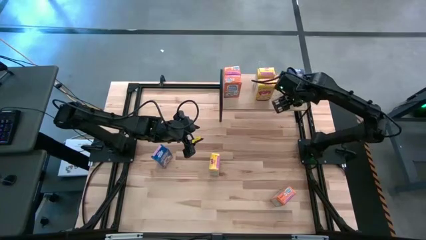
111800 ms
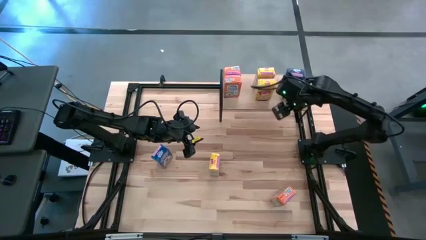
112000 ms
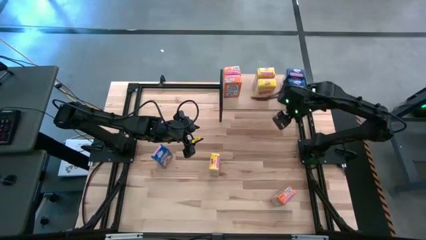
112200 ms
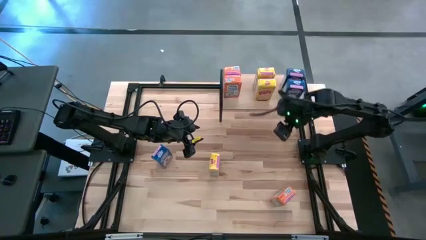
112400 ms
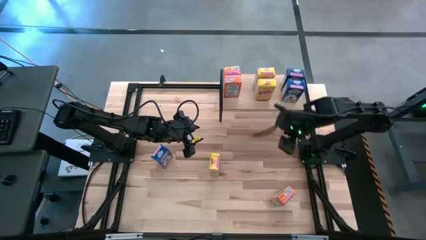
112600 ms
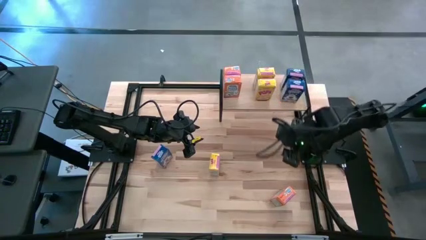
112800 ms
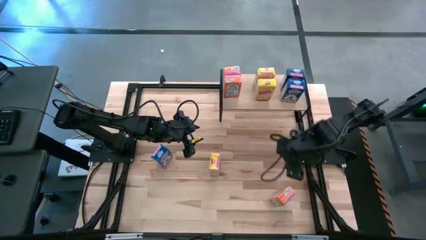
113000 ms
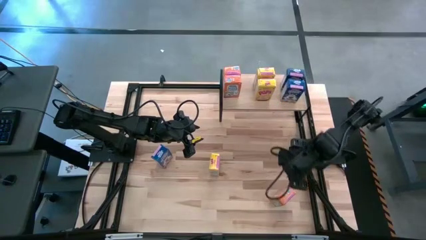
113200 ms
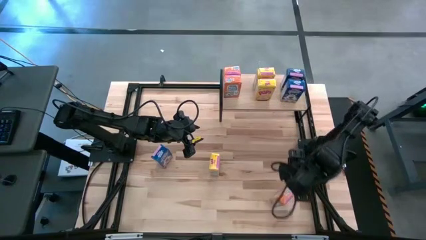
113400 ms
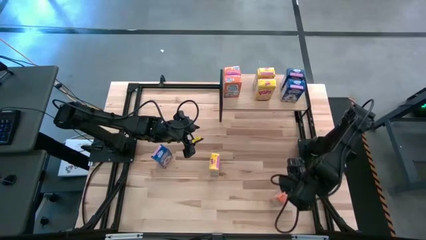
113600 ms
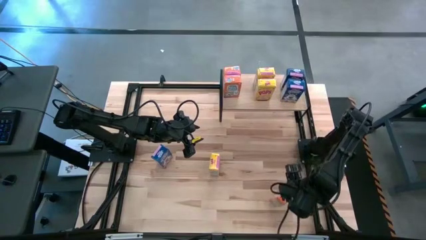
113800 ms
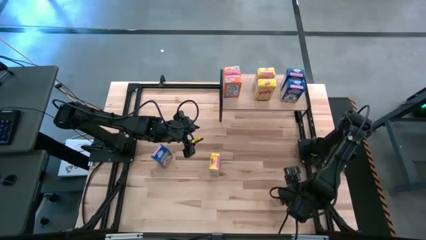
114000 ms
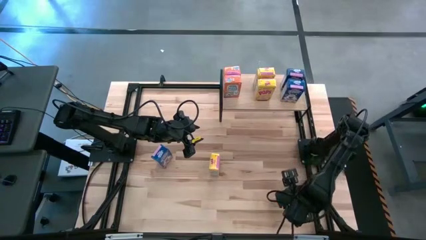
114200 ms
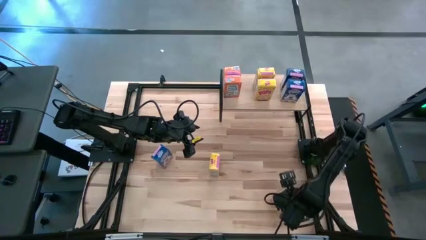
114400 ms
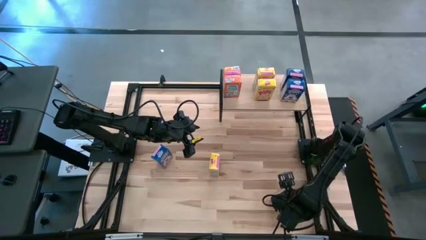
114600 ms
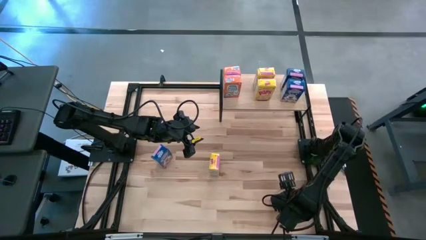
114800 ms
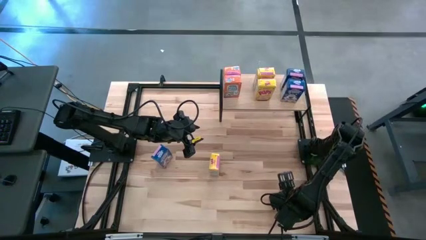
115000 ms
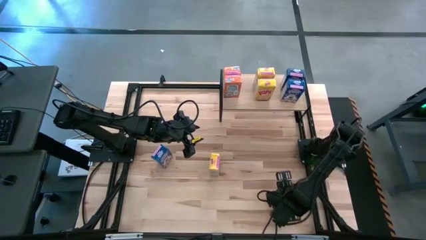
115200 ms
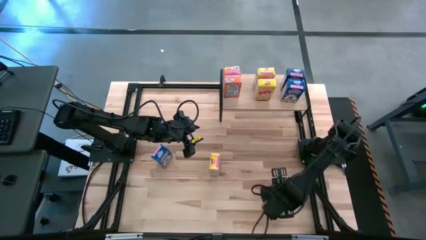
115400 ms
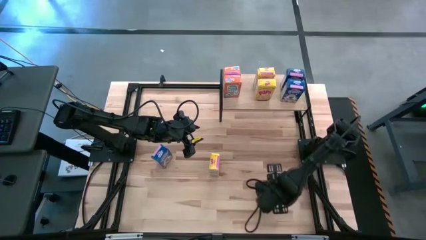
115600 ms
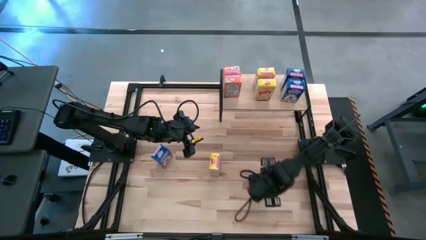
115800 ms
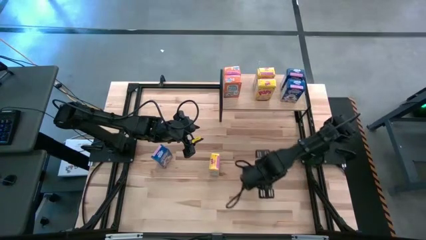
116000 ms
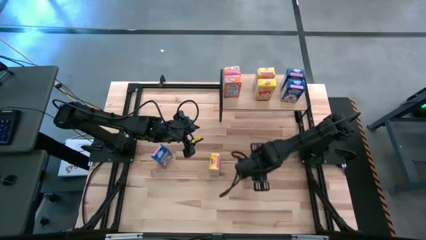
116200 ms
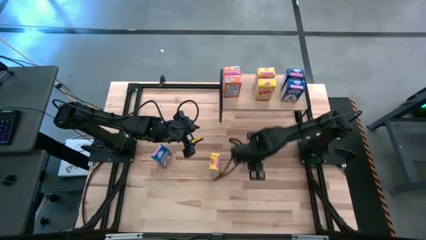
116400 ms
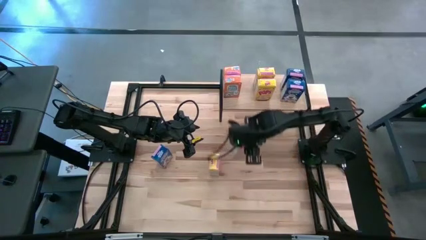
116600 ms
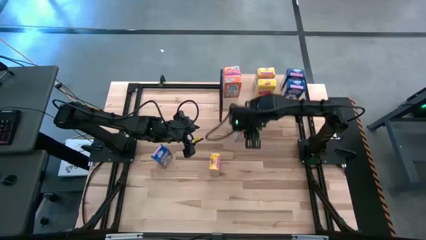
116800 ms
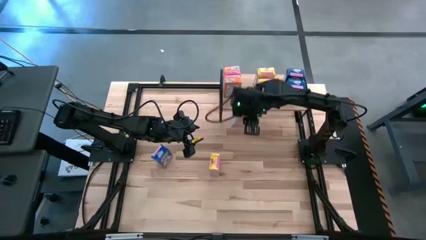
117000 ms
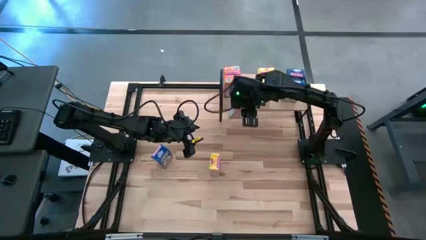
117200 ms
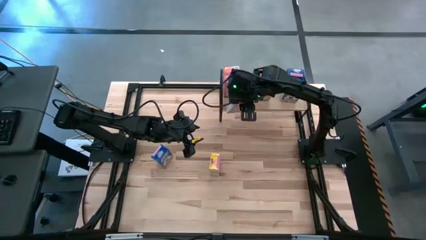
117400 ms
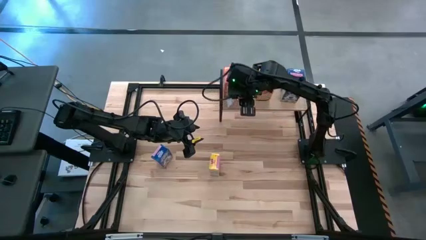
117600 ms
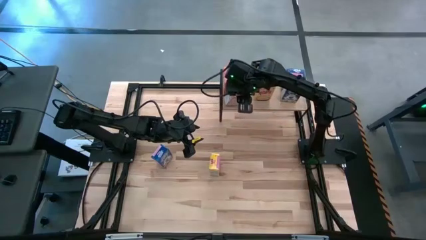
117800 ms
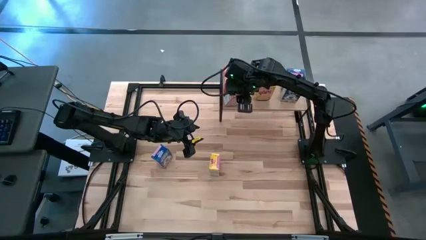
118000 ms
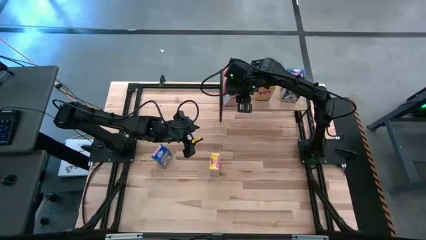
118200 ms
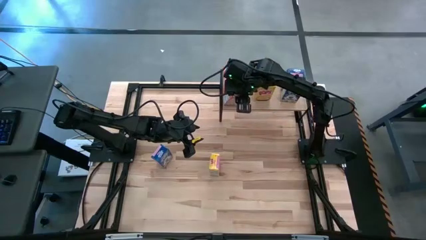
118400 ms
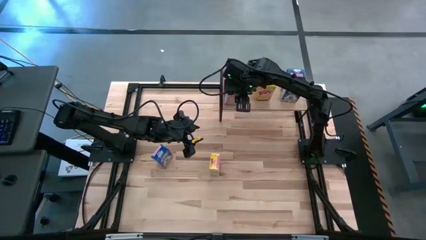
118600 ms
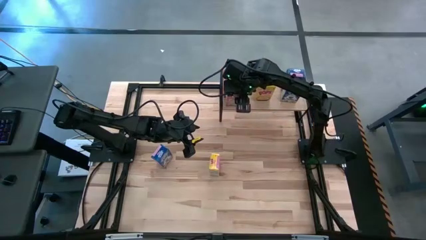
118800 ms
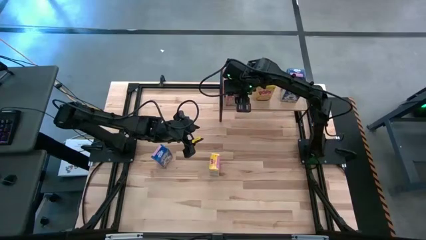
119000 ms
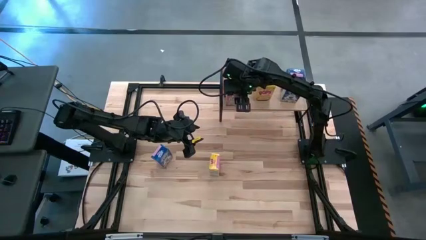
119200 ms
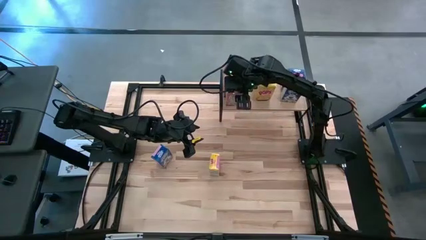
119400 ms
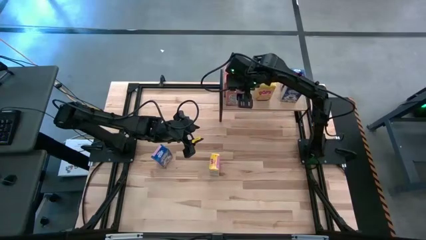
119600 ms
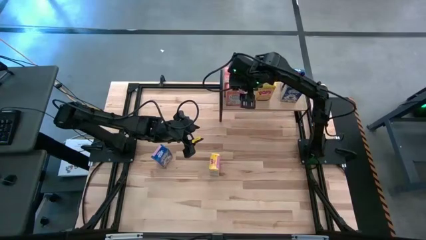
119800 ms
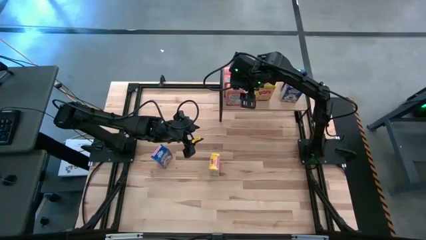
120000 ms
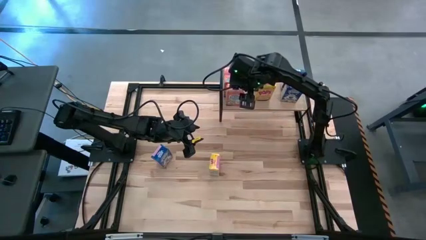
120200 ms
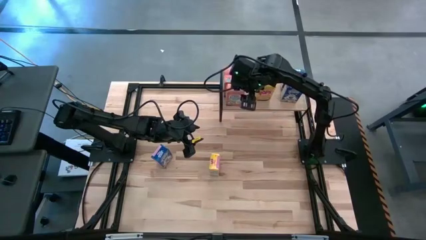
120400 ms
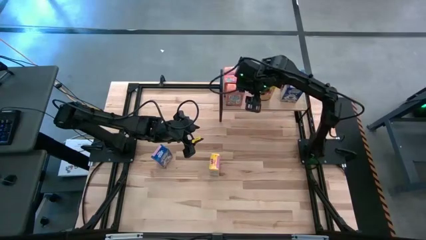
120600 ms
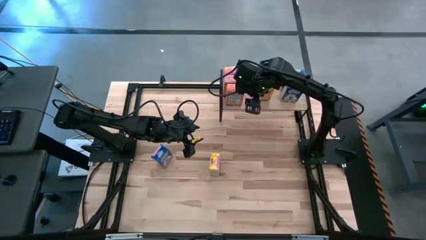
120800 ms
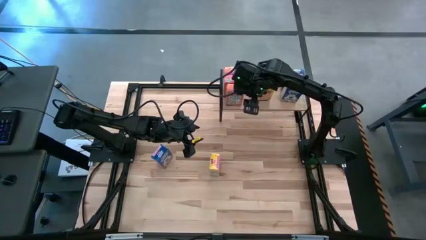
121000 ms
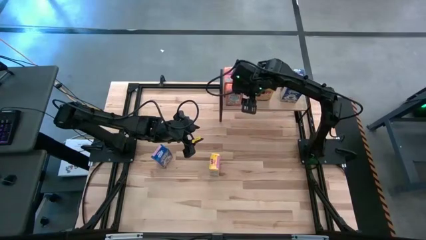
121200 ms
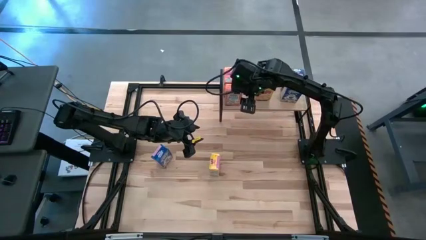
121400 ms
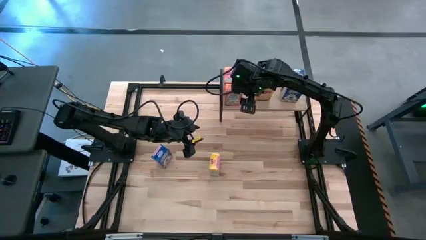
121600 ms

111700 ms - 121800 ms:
Task: Stack cereal on shelf
Put the orange cereal box on the shelf aligned with the orange cereal boxes

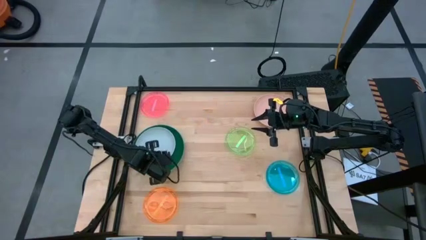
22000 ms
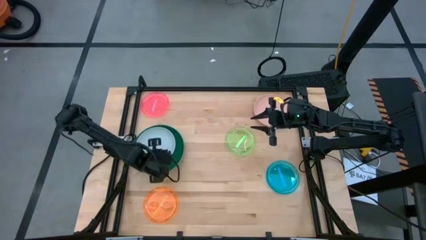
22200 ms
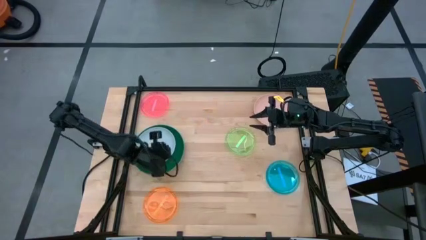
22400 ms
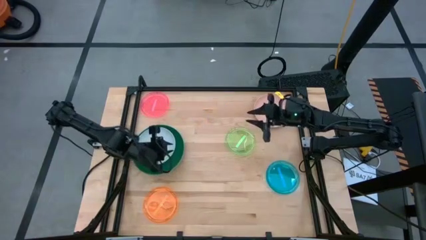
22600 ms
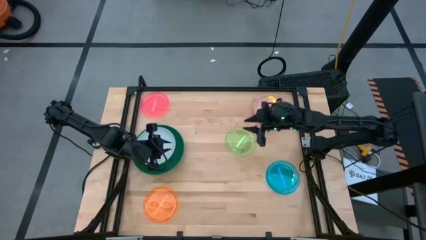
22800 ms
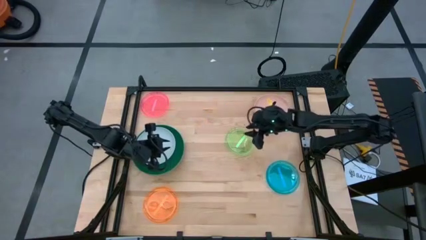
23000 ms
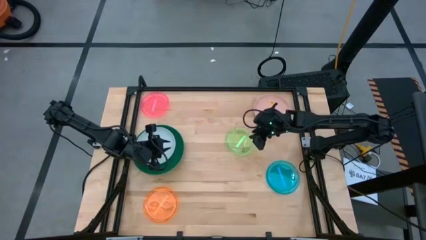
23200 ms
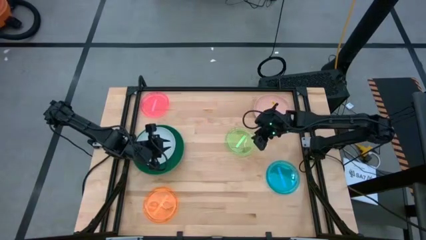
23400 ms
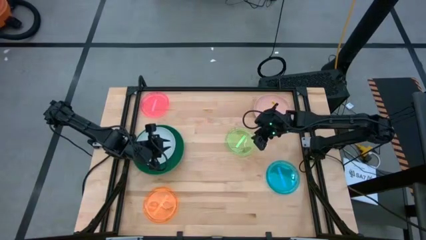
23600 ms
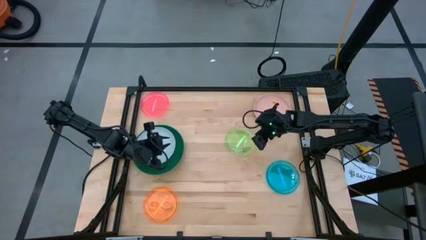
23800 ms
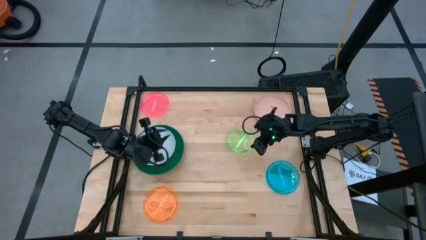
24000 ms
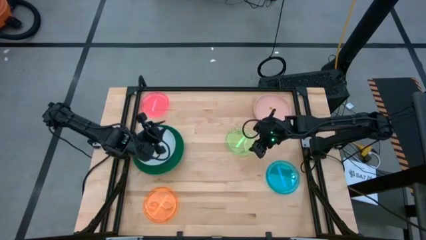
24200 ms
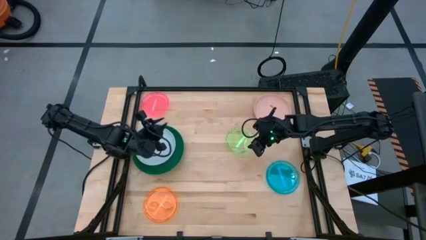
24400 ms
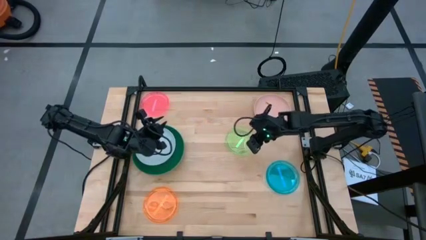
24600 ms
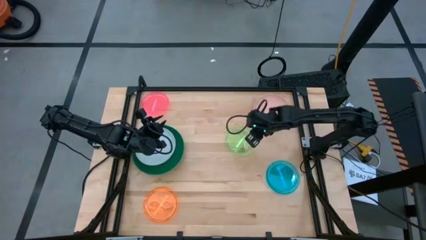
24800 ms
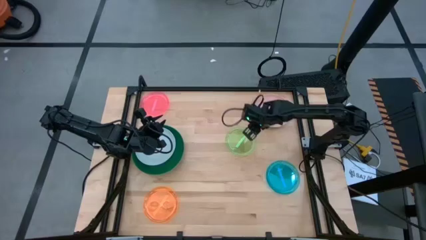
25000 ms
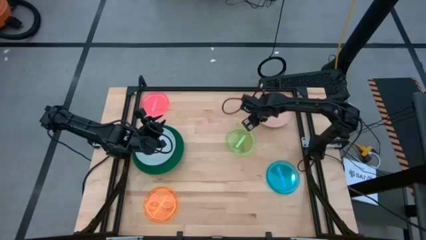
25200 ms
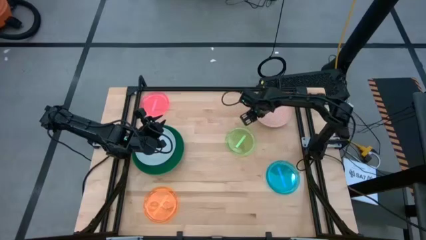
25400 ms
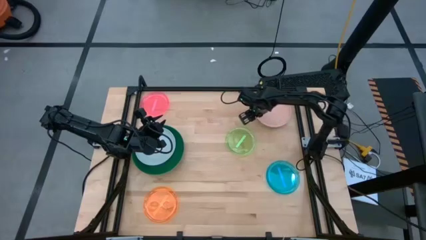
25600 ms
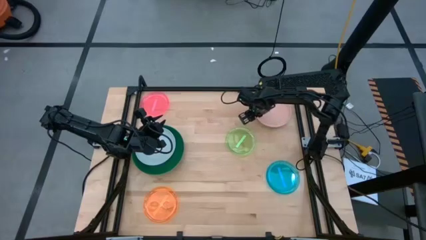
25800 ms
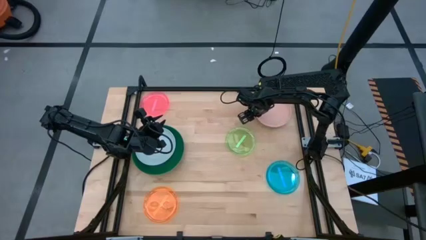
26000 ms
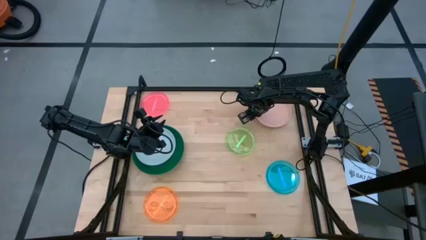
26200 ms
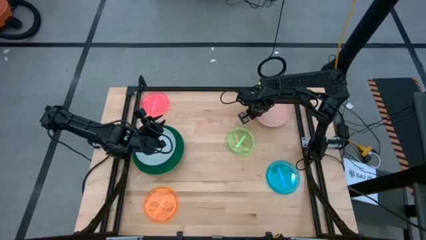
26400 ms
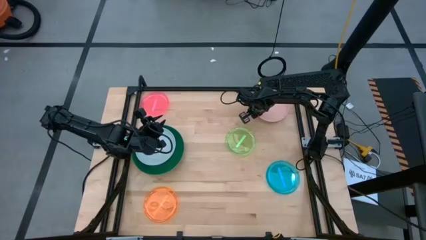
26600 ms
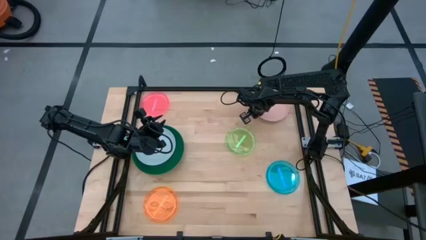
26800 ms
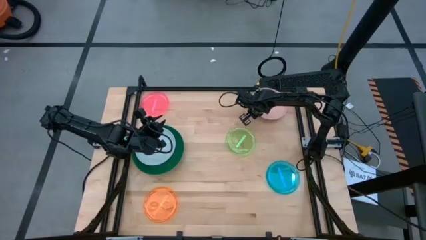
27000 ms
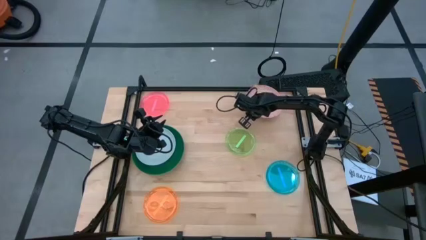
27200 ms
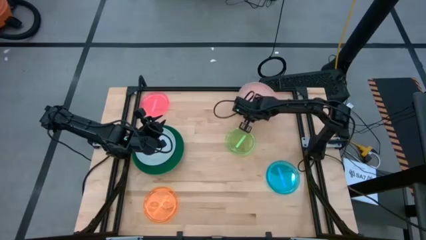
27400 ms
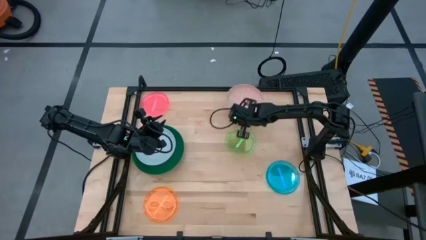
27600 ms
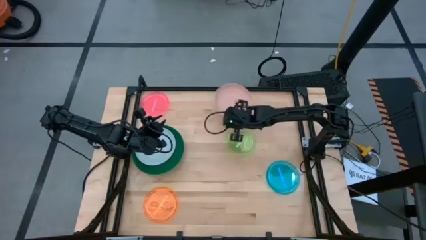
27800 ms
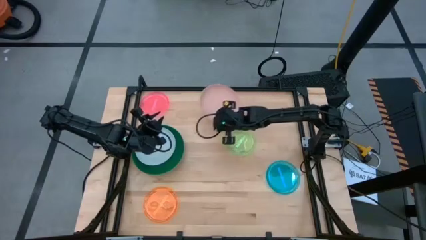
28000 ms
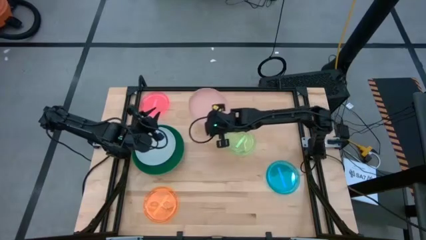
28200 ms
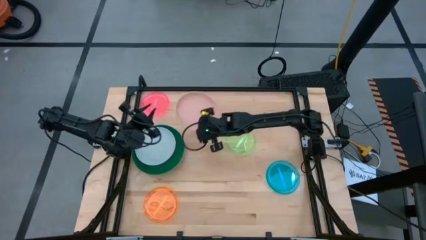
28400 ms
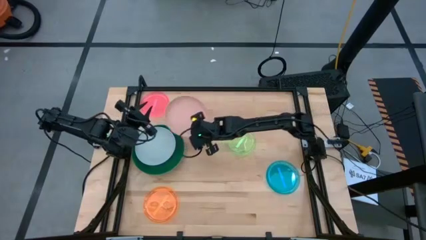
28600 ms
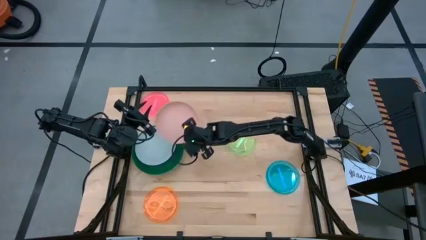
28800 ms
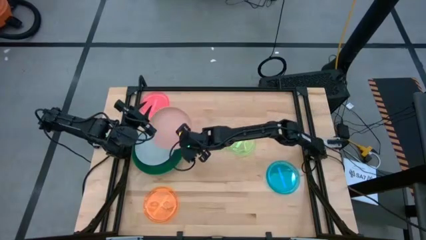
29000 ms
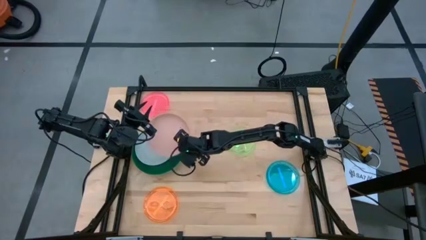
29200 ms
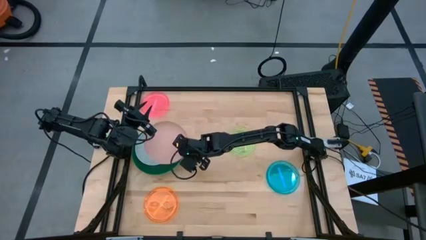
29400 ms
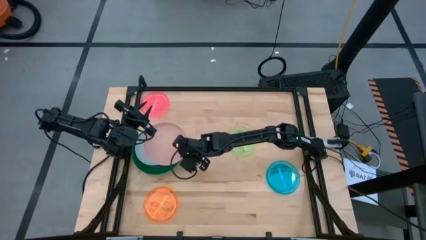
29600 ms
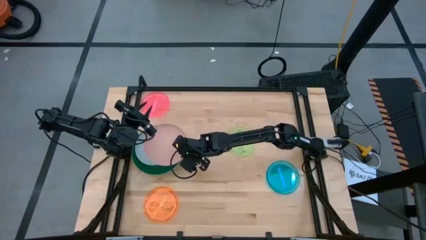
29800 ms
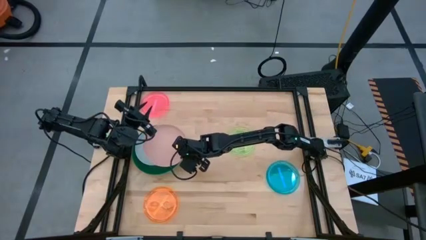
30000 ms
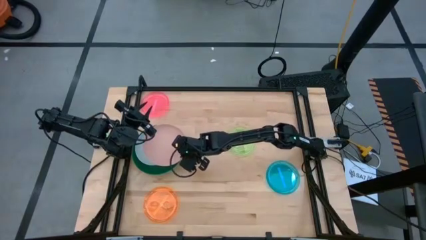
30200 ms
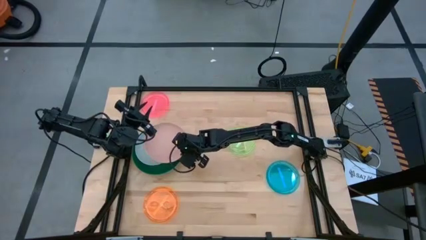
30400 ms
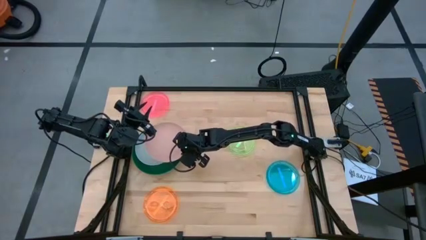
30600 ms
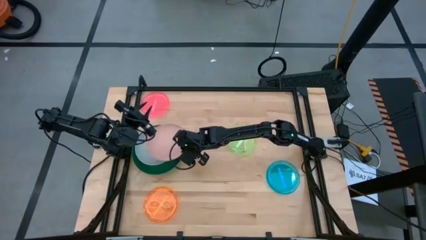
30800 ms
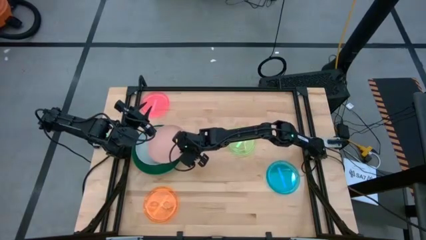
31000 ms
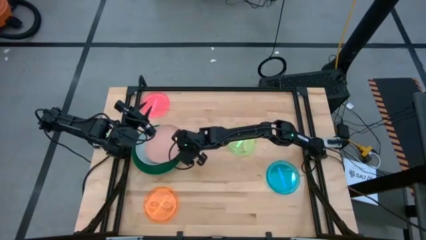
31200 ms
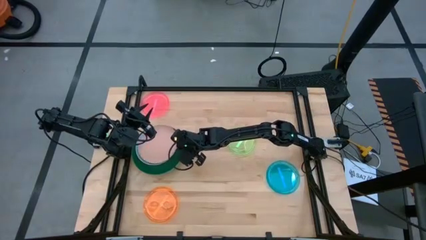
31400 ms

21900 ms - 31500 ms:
Task: Stack plastic plates
Stack the light pink plate on top of the light blue plate
